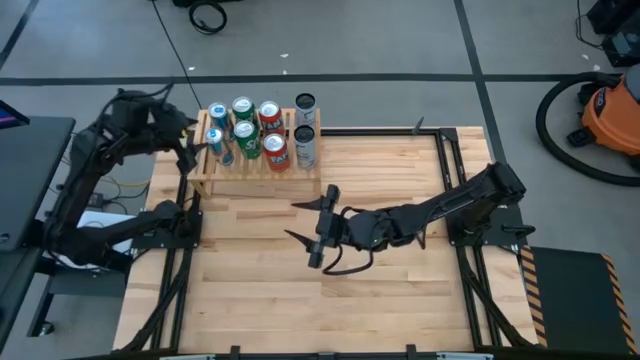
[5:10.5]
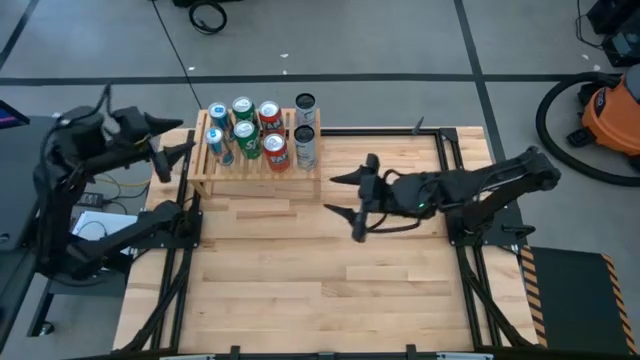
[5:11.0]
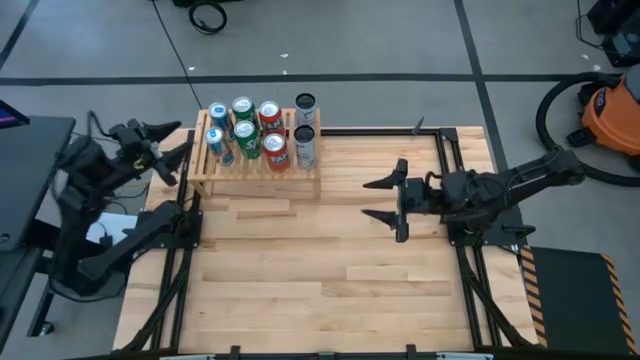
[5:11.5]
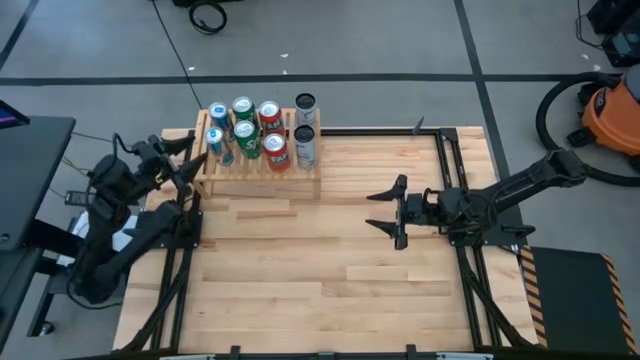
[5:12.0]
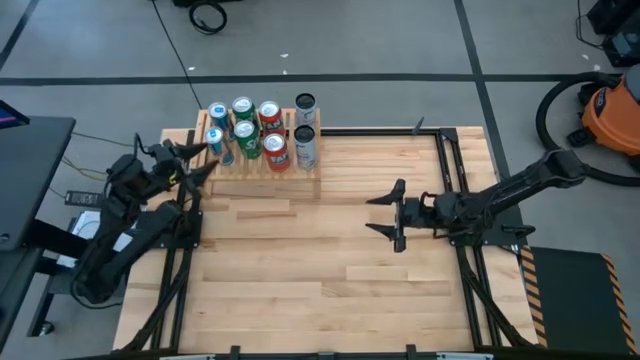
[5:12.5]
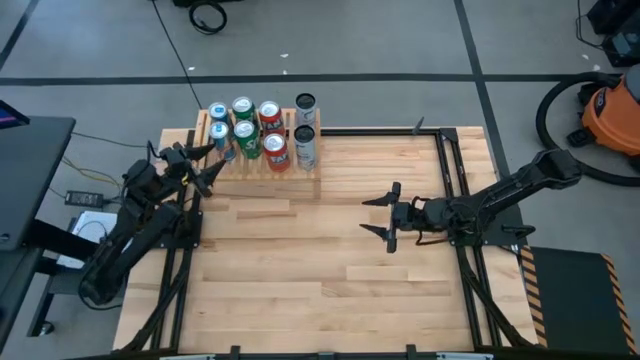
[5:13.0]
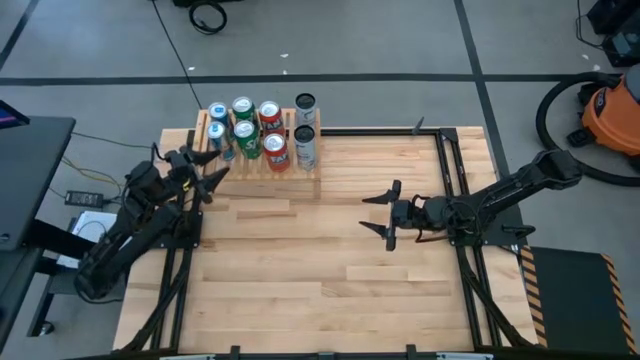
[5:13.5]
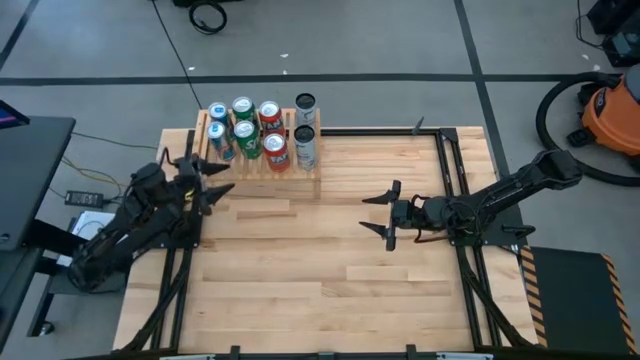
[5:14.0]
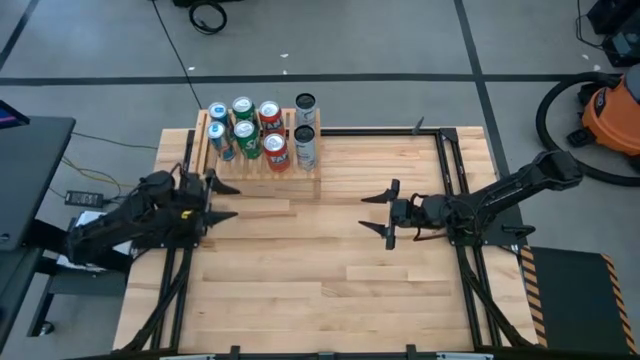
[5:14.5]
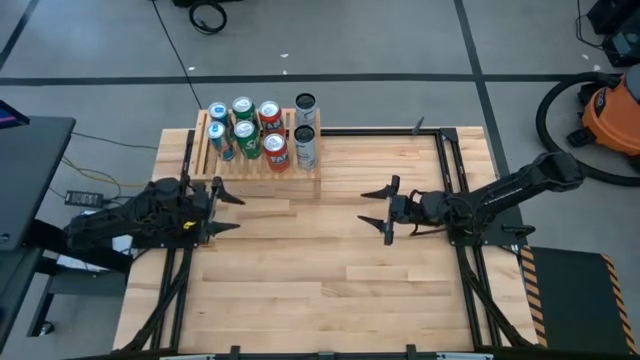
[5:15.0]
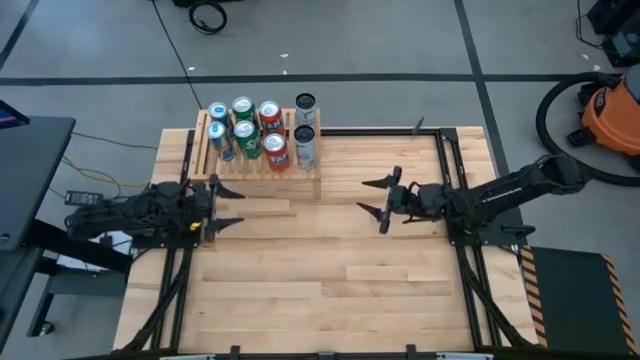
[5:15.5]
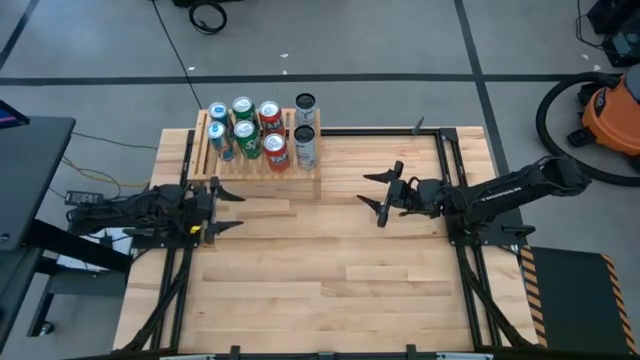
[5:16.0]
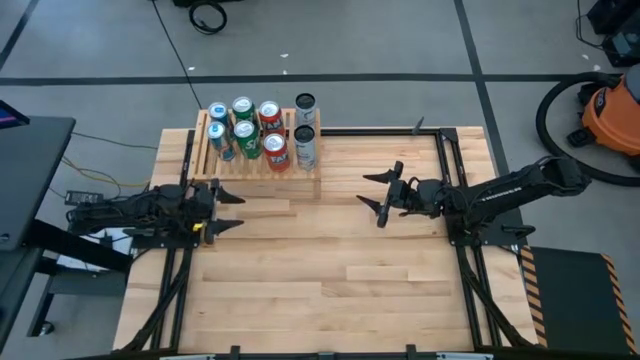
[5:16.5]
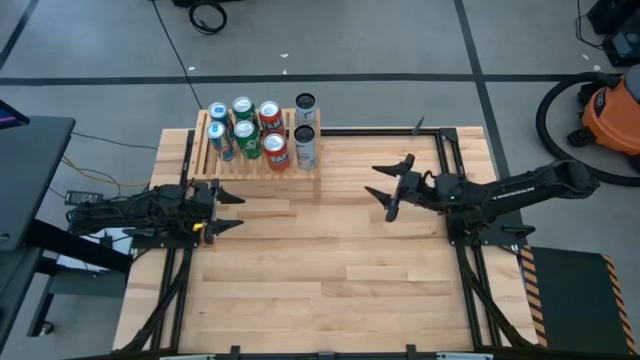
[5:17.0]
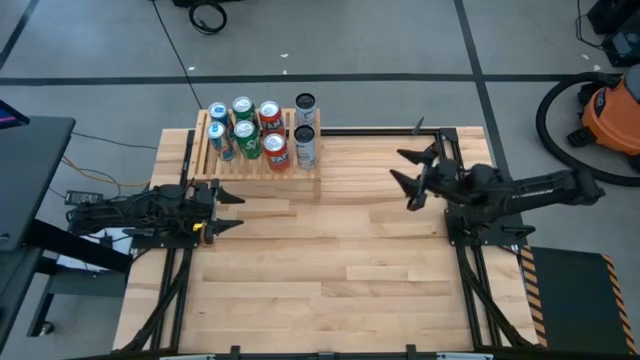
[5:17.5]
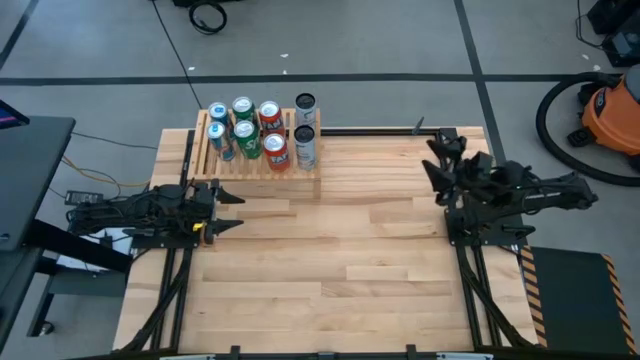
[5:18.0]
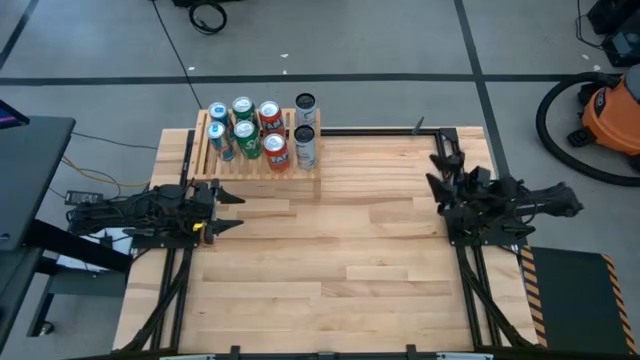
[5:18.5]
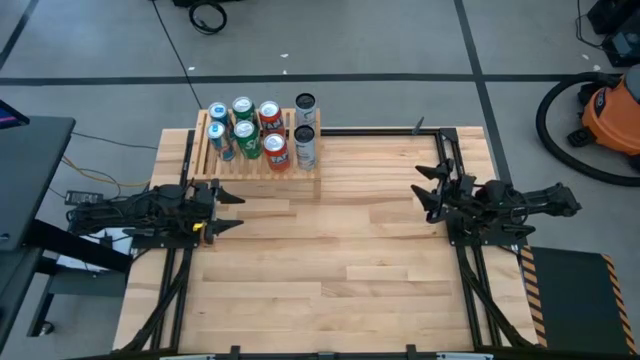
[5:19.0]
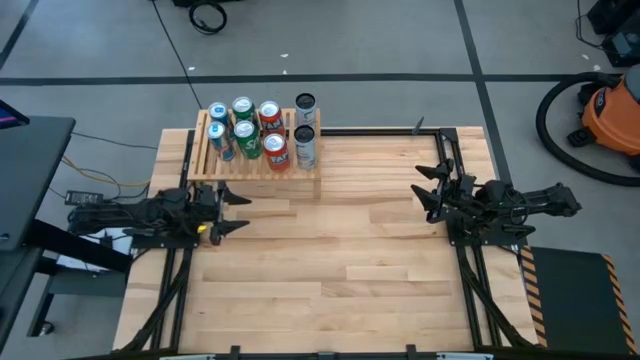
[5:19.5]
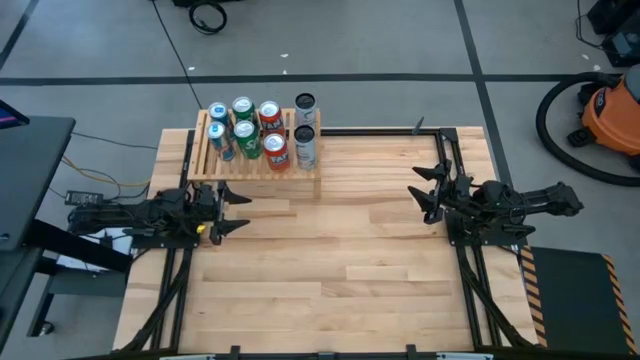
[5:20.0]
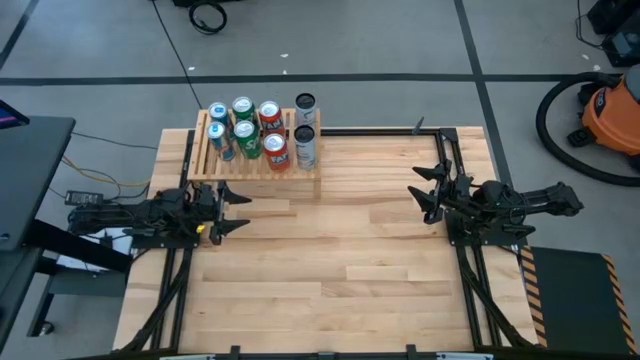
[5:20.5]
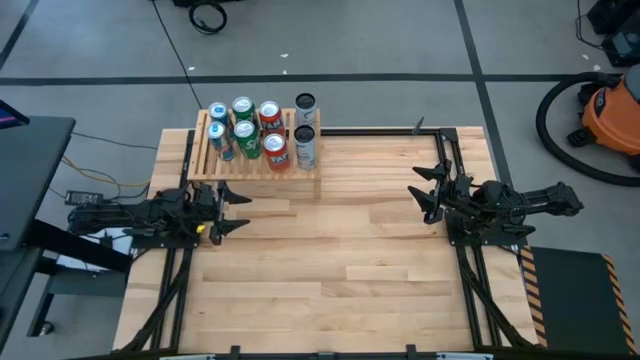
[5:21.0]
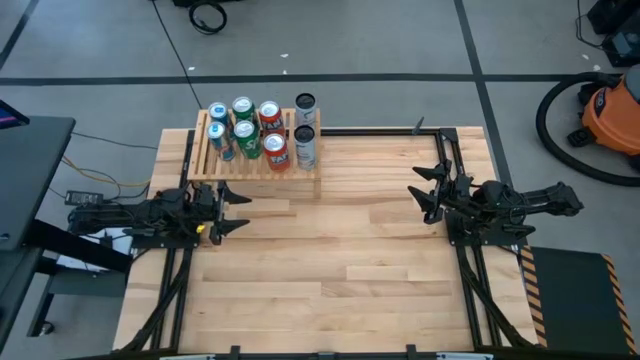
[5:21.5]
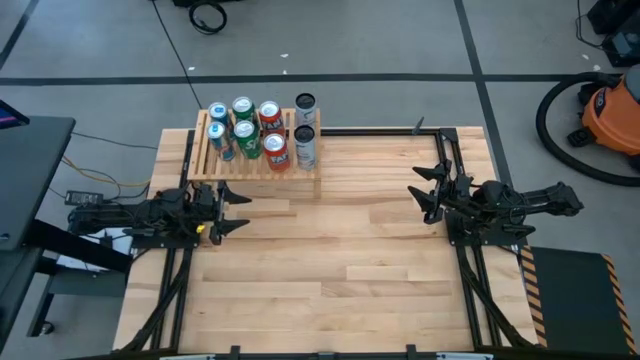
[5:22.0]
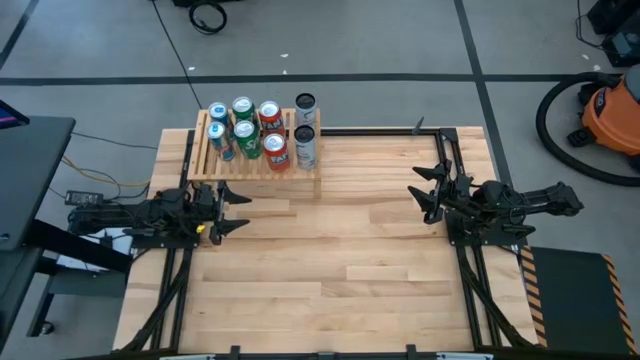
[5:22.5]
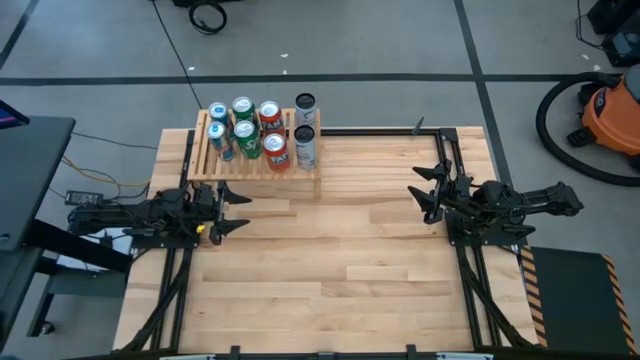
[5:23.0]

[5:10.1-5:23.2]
Task: Place canned beverage on shelf
Return to Home Position

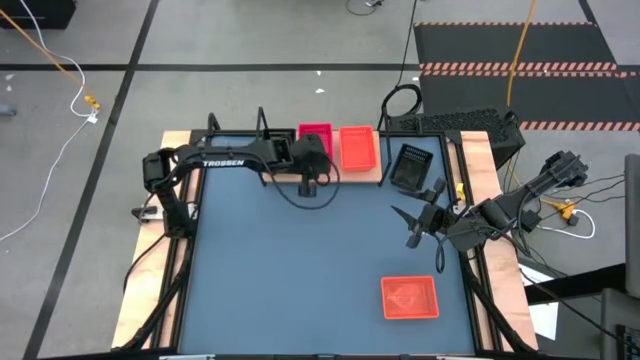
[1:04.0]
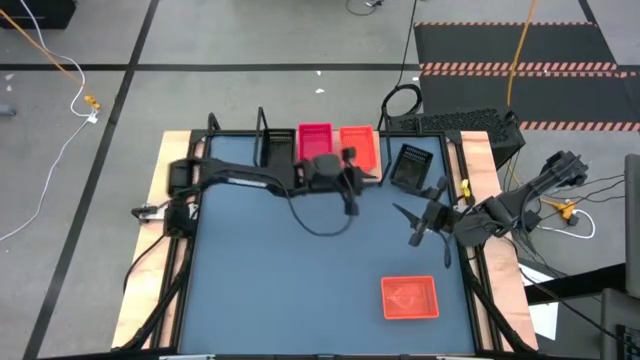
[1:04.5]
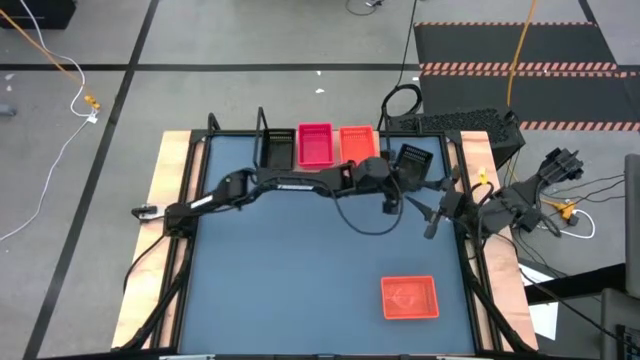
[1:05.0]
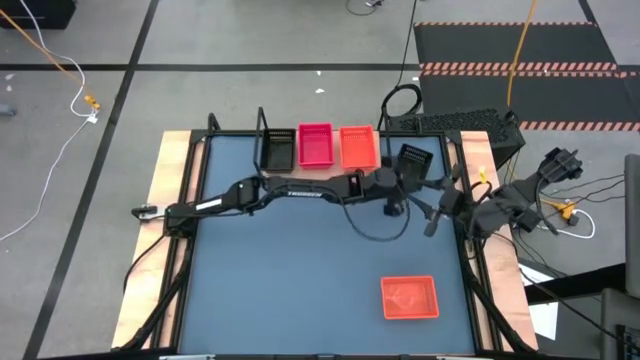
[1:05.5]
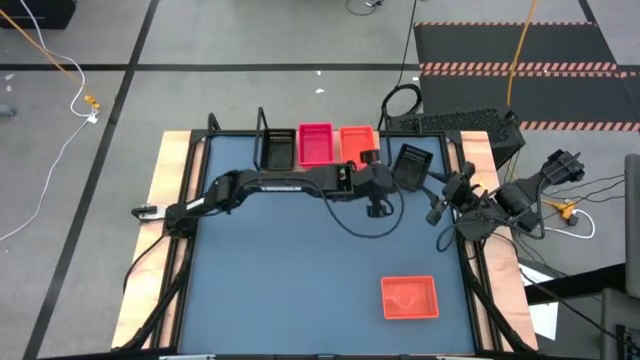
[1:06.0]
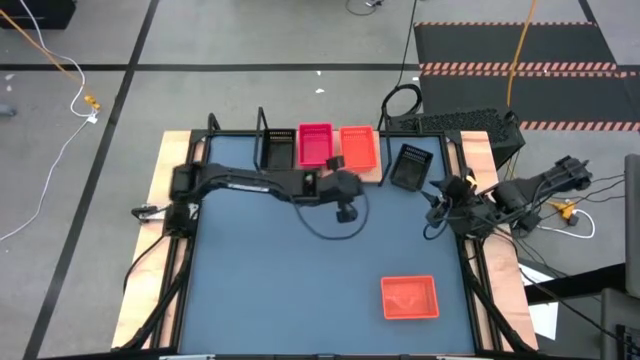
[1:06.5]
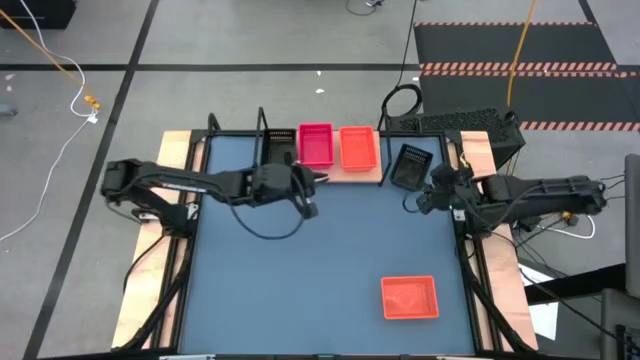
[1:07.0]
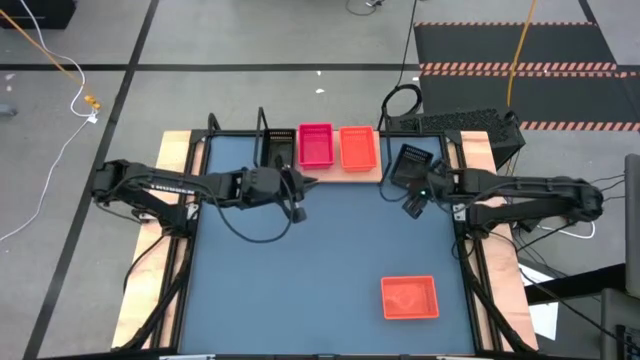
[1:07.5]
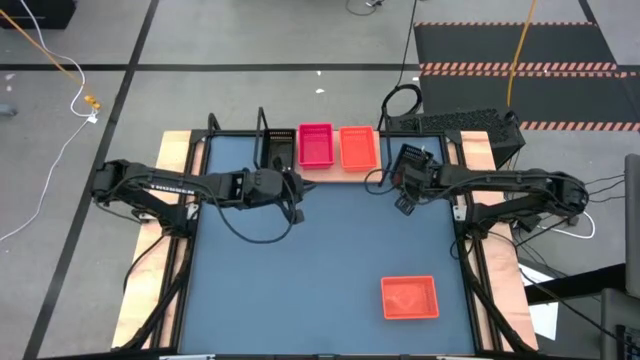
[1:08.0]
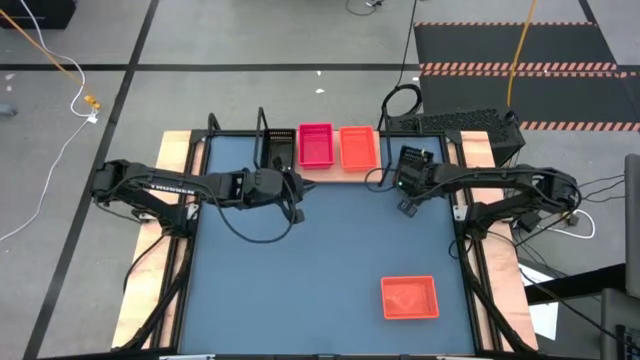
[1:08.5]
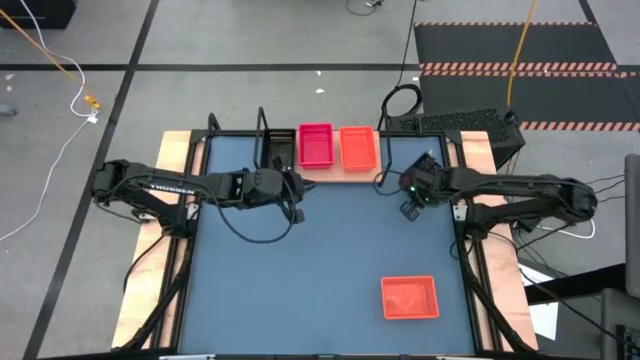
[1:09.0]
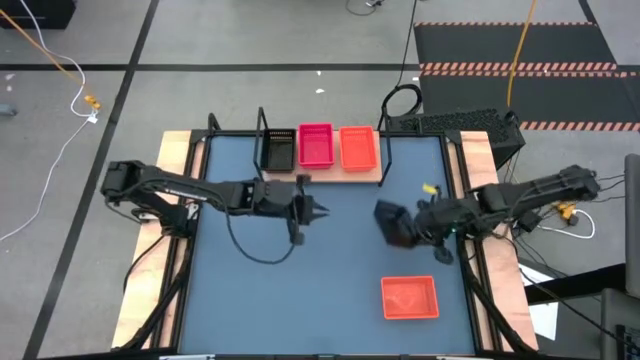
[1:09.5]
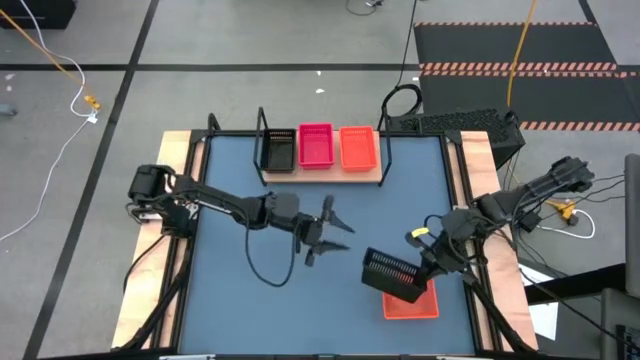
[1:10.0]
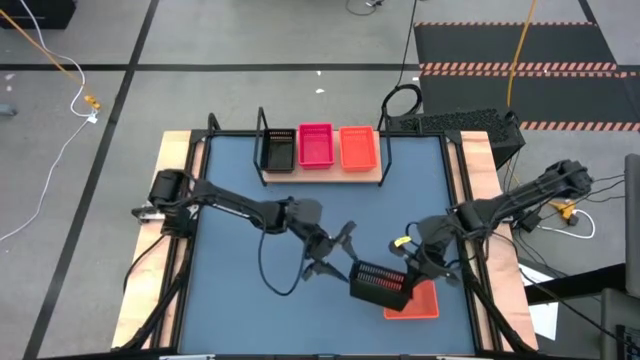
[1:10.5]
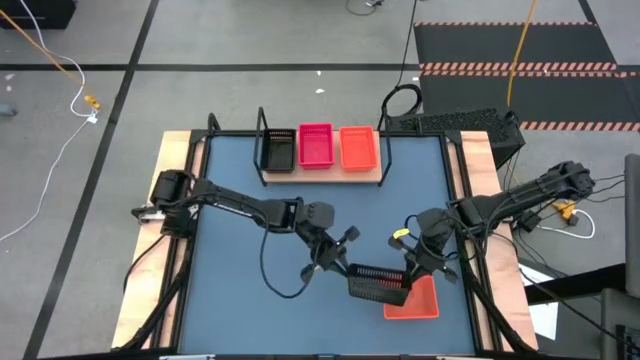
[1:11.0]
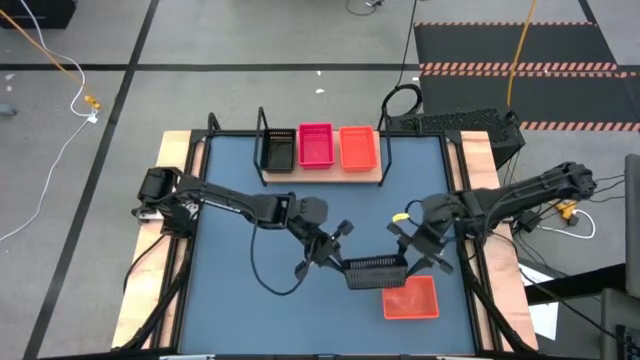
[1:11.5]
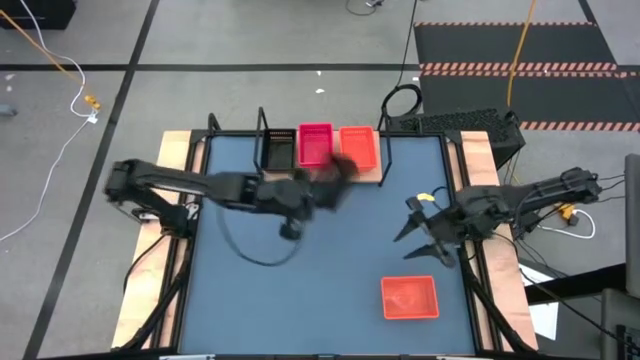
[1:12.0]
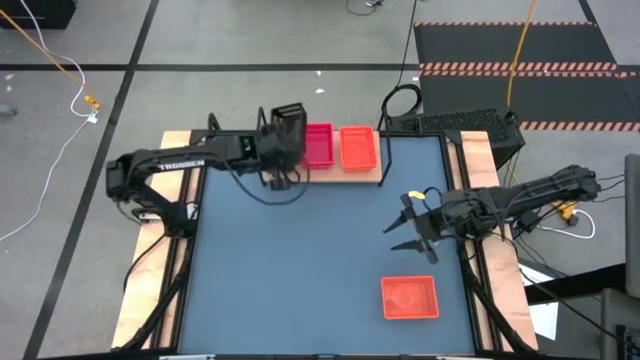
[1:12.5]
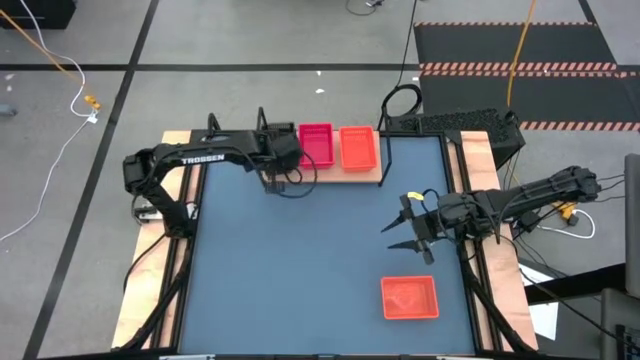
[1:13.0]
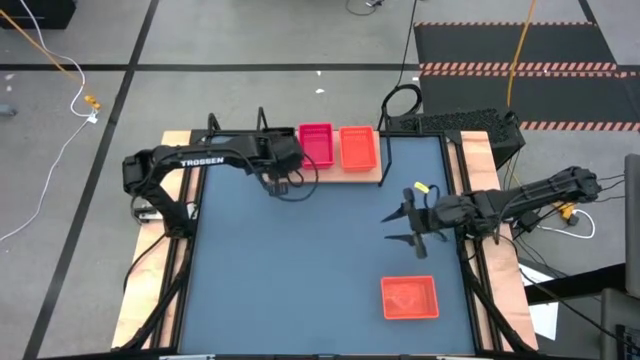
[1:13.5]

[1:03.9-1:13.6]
Task: Stack baskets on shelf by color
Stack the black bin on top of the stacked black bins on the shelf
